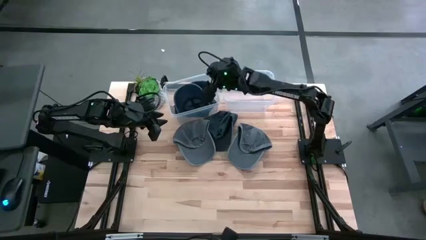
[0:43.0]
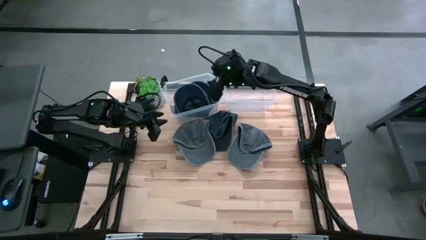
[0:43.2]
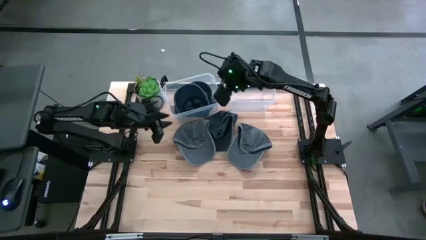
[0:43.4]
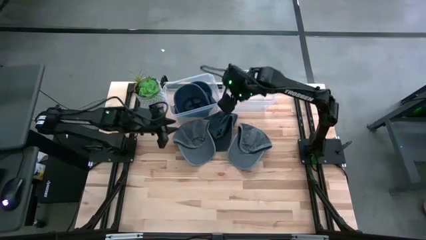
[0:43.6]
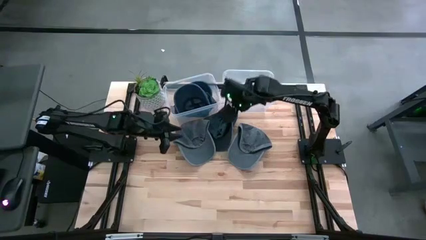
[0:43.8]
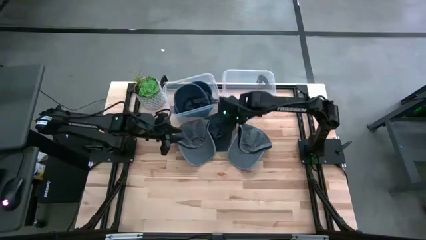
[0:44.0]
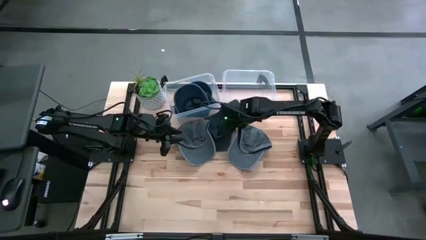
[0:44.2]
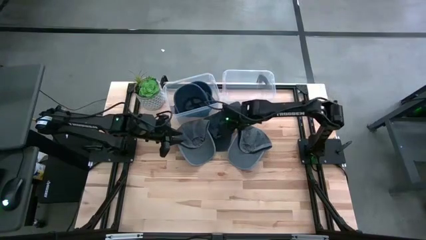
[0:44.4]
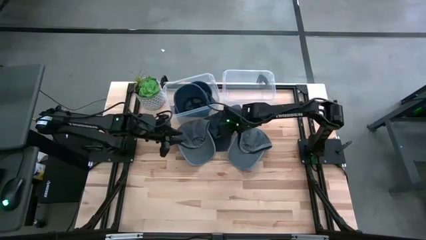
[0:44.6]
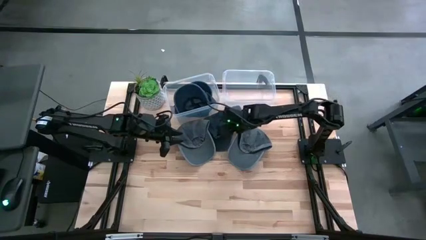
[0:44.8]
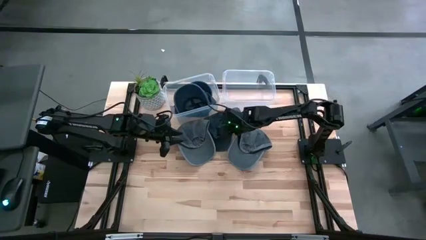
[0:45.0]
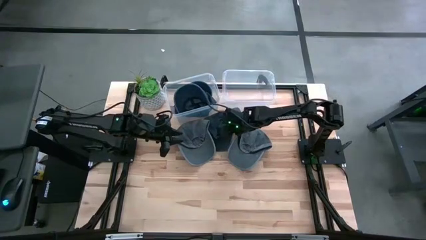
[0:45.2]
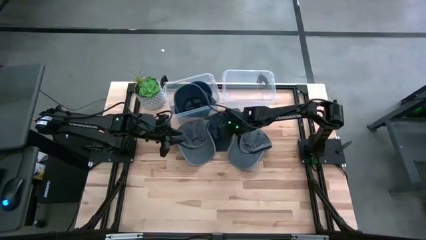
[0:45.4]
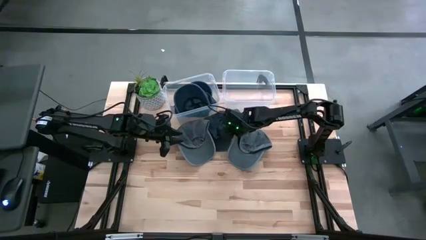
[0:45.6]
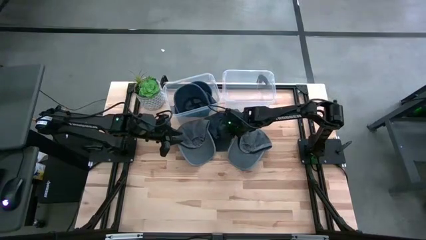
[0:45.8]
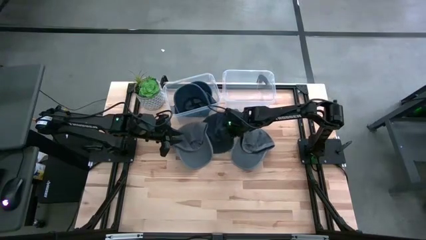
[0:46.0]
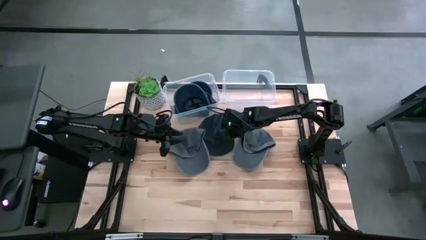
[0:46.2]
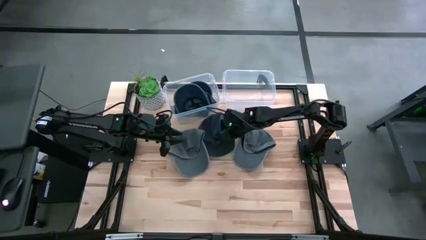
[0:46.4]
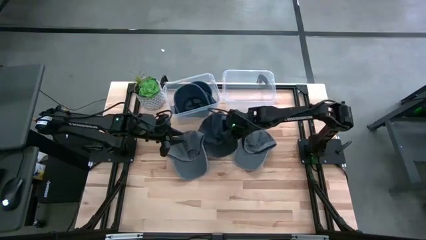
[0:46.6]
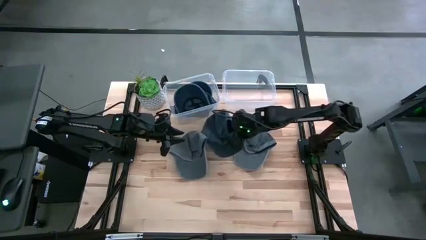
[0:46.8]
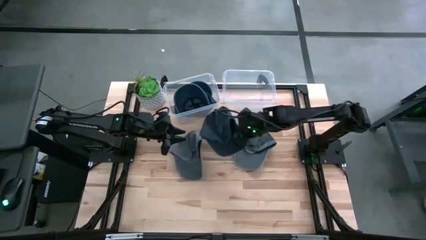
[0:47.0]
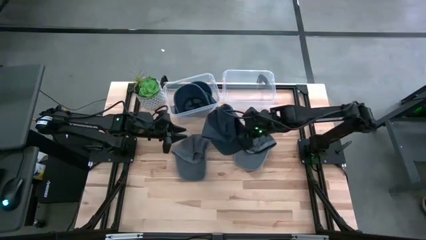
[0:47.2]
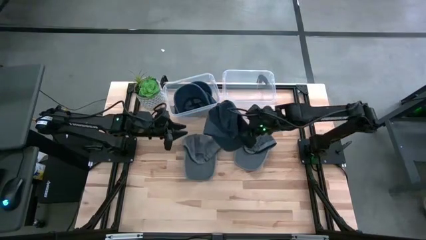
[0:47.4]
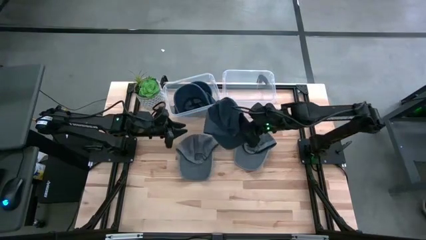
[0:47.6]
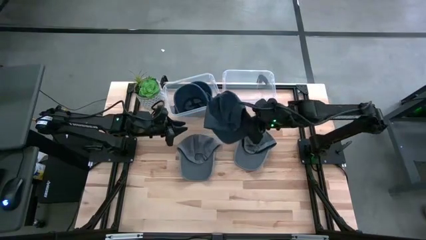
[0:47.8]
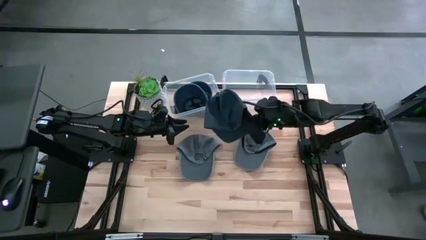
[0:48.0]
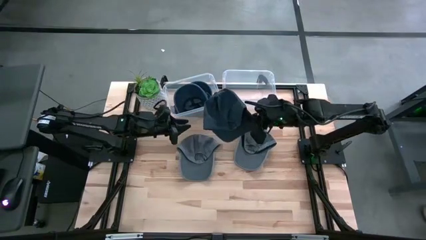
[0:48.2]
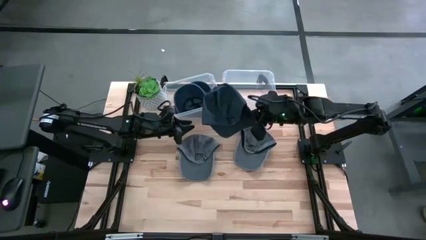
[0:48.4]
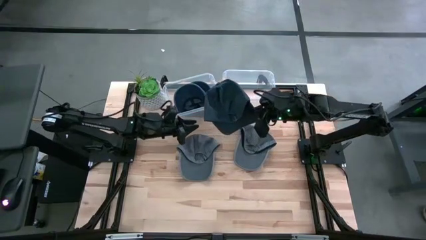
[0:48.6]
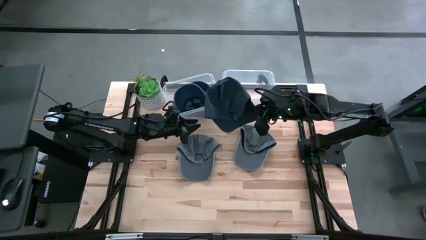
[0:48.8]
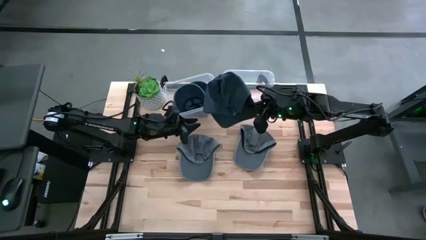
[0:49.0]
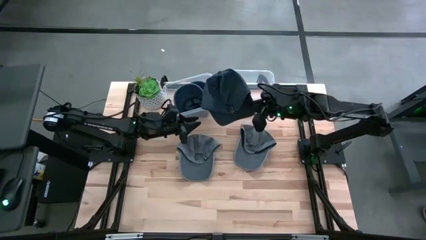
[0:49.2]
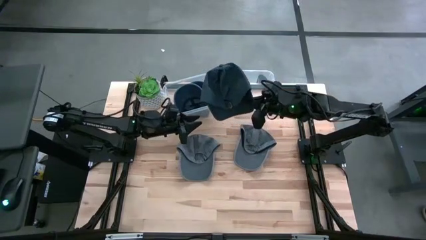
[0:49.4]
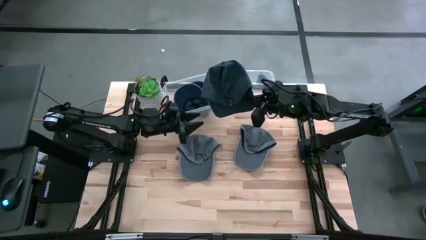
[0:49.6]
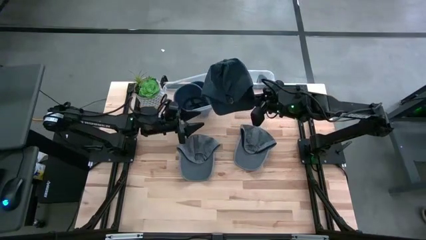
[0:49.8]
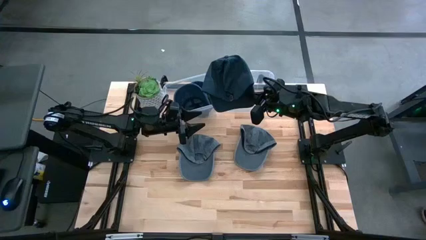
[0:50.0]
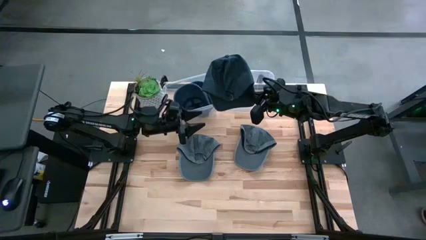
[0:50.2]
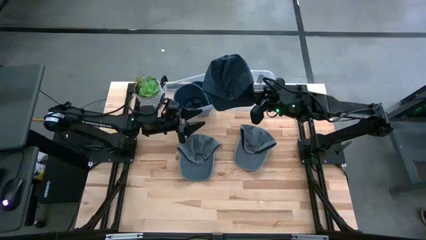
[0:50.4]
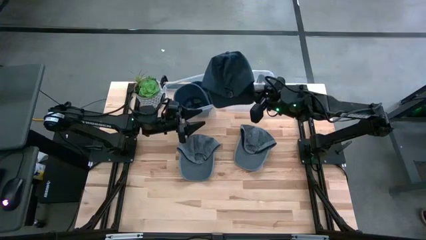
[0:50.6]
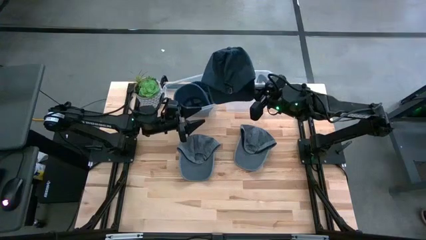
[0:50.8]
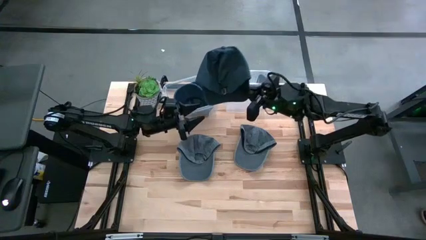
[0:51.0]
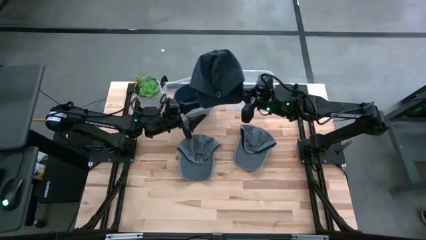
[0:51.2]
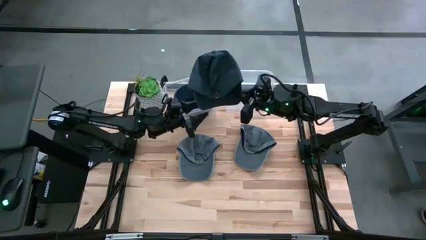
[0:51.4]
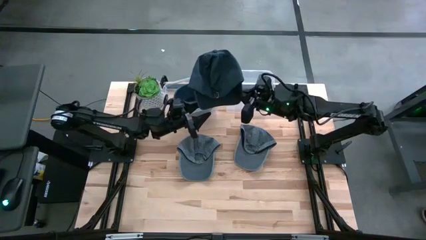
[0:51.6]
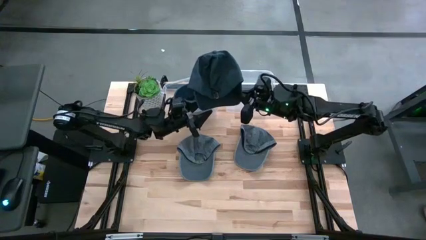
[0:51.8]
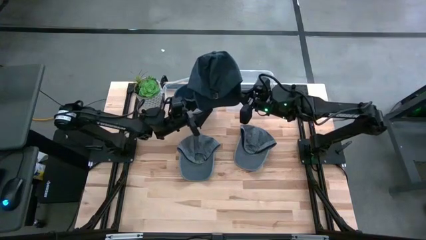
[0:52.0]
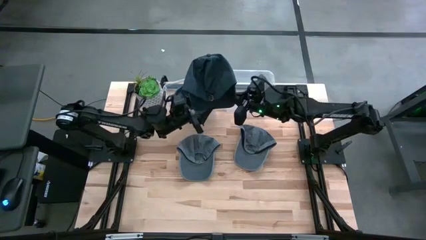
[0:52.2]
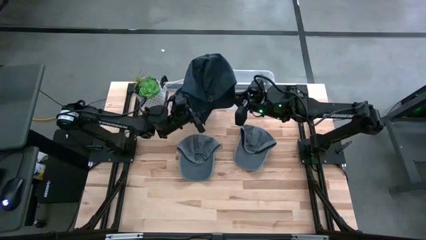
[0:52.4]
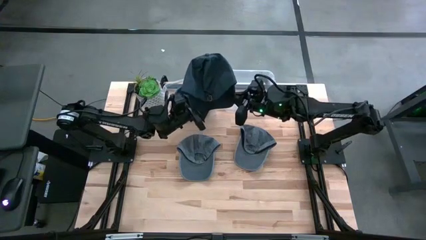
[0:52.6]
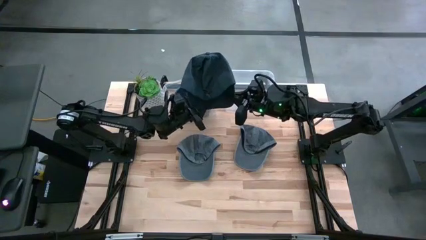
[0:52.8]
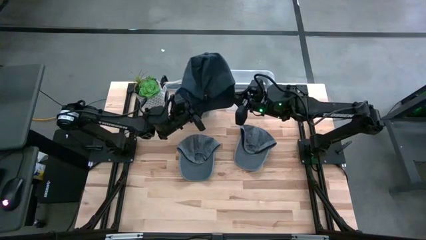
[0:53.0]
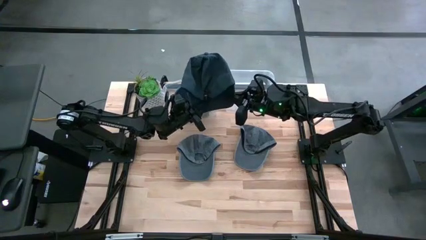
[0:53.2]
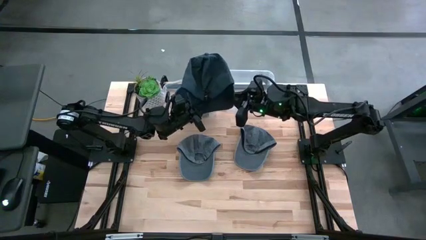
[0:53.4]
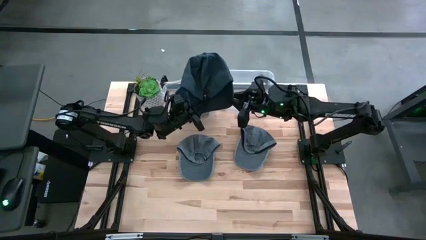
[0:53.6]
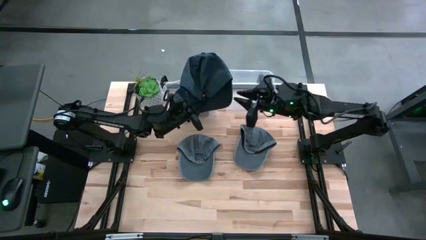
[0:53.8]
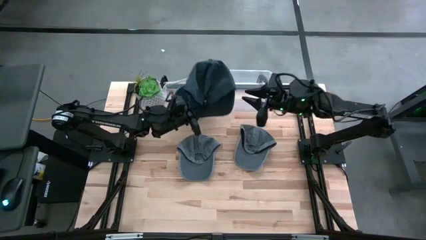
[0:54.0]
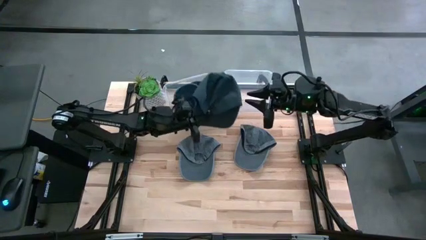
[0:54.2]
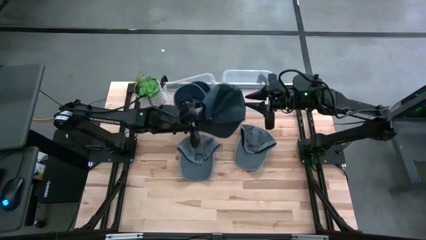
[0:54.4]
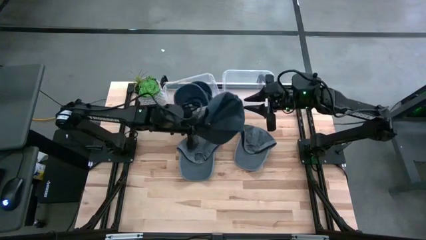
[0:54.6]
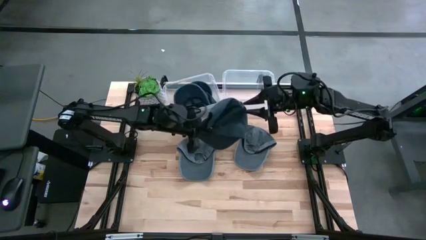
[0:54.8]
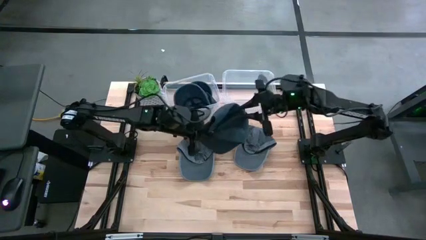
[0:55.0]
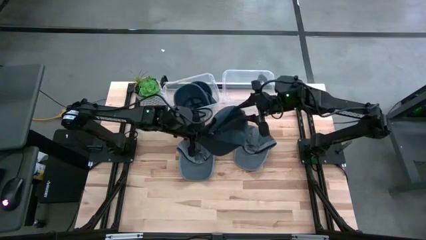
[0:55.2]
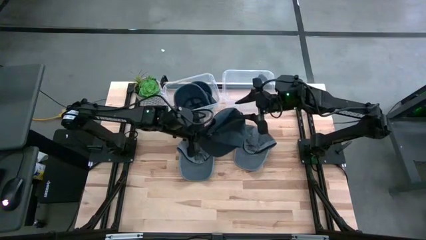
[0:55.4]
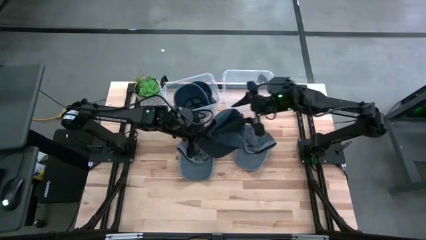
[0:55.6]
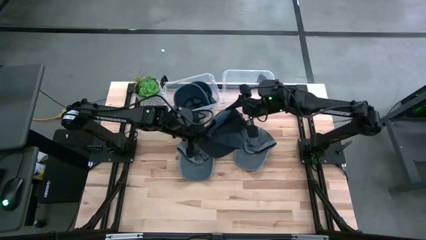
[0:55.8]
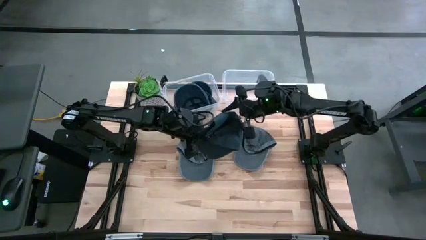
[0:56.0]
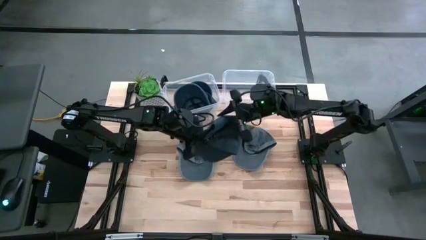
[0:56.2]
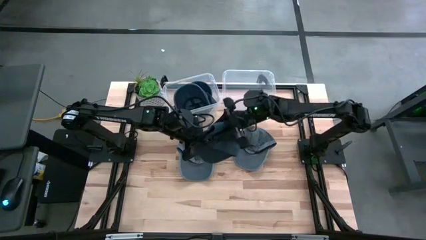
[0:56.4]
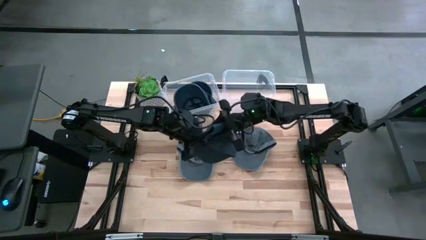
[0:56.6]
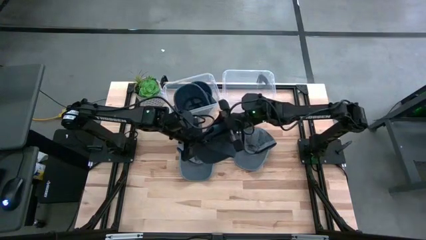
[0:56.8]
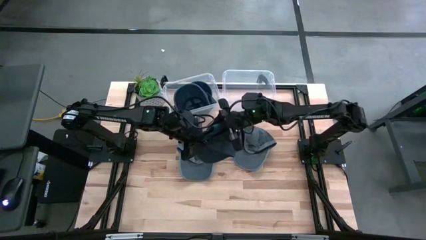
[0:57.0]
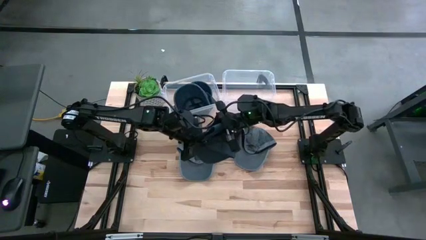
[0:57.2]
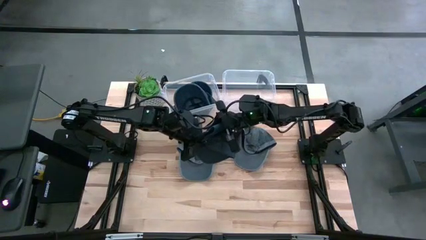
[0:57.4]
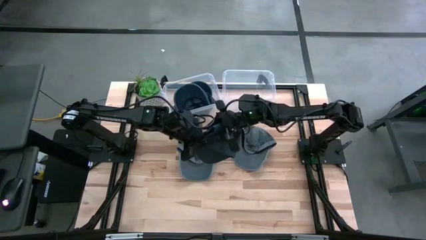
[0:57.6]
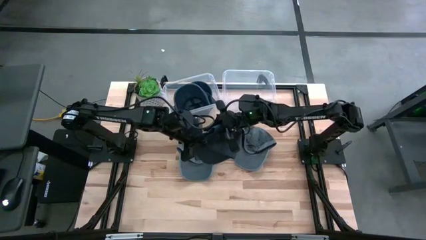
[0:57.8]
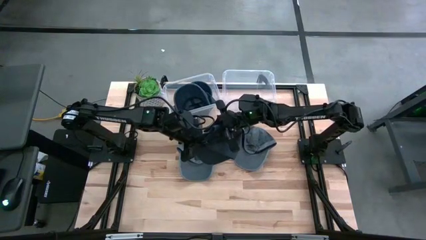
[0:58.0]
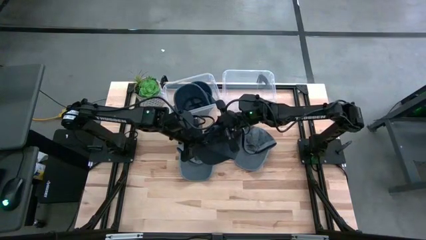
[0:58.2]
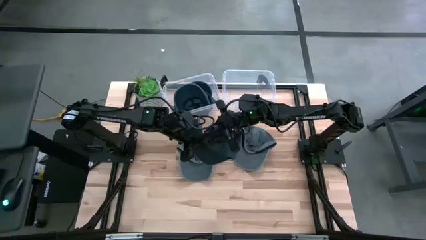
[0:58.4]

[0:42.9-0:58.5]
Task: Pick & Place hat
Put the dark blue cap into the left transparent bin
